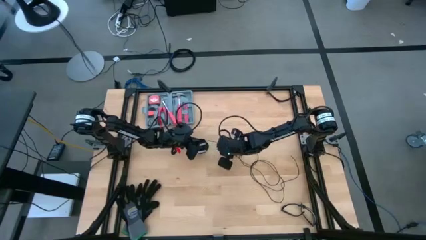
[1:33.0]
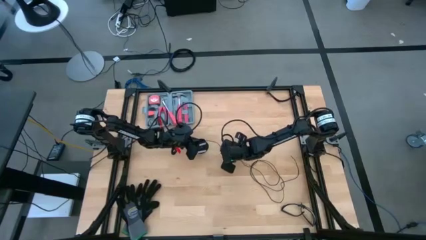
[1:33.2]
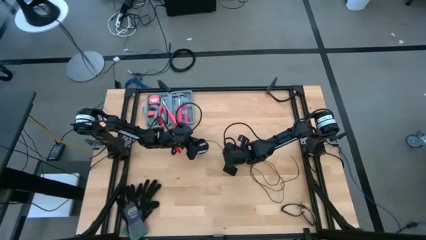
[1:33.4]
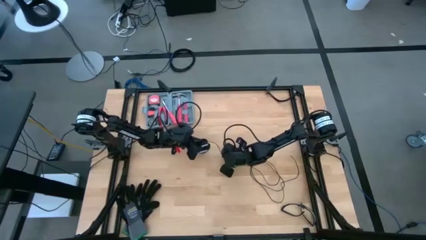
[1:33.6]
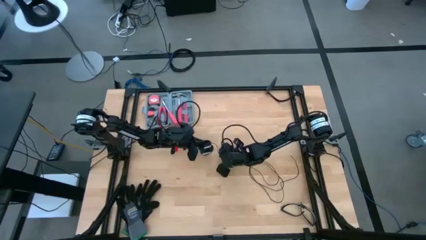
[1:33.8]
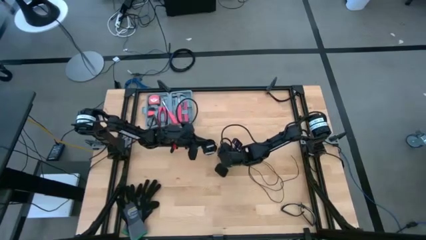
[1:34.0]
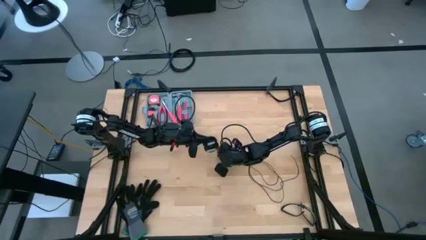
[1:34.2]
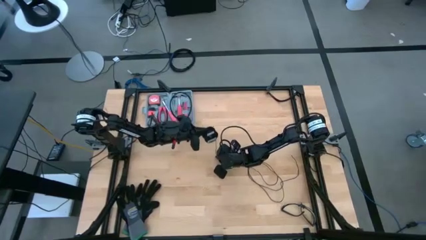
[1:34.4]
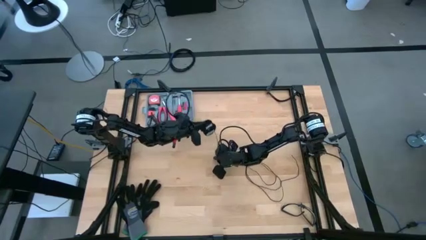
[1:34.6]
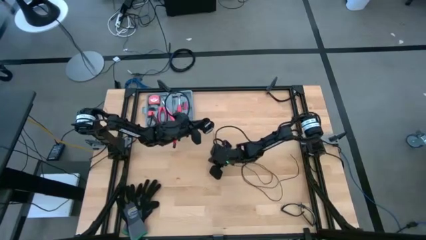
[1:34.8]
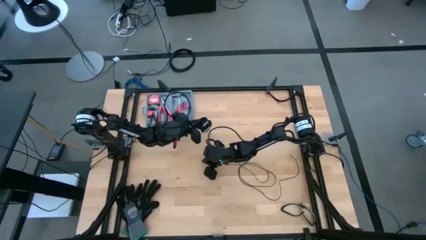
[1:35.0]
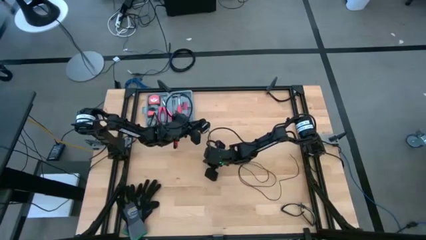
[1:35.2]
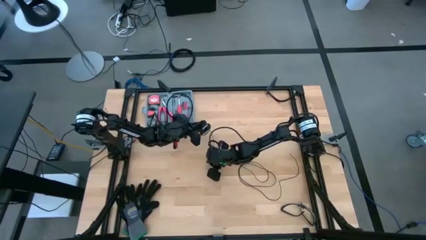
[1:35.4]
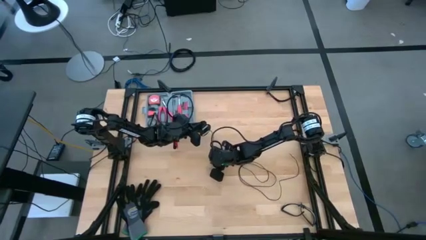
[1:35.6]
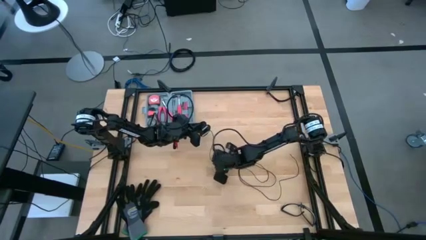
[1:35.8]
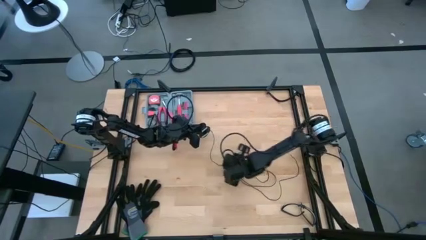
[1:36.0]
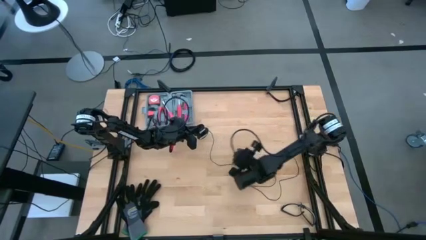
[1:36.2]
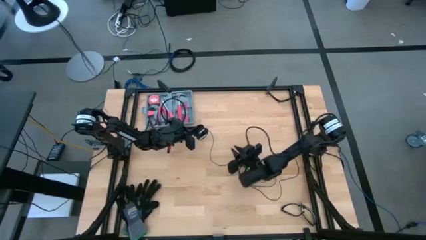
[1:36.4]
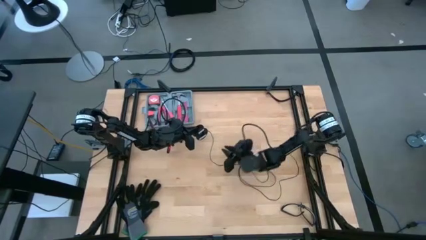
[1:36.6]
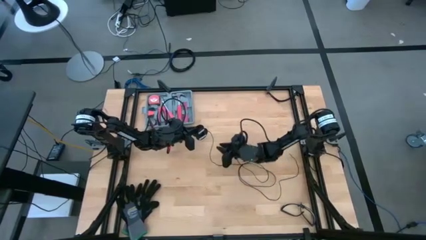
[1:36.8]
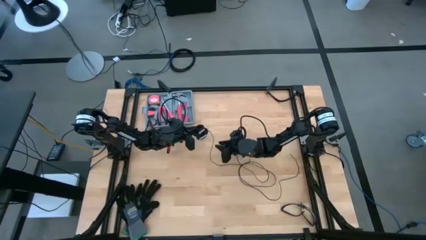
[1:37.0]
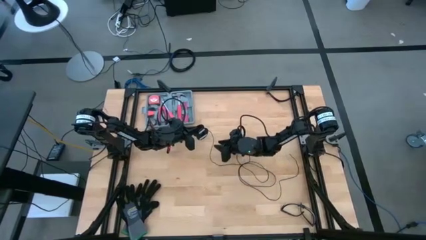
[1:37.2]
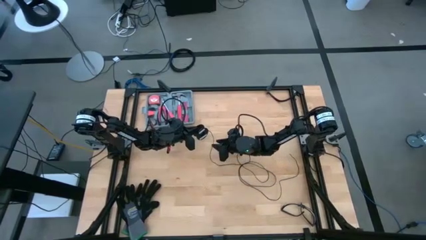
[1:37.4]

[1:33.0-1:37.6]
Task: Coil cords
Coil the black wire onto the spool

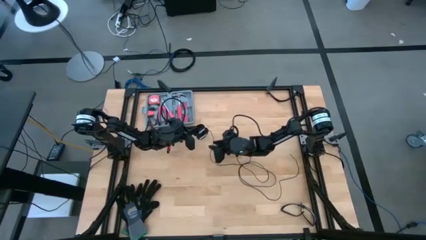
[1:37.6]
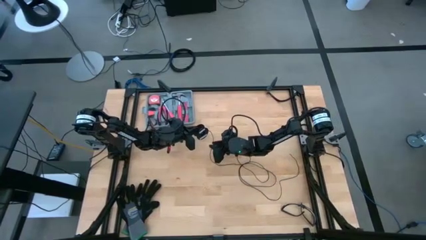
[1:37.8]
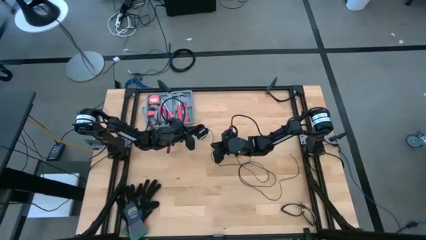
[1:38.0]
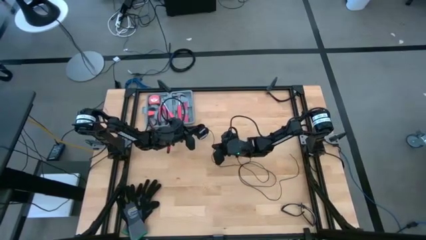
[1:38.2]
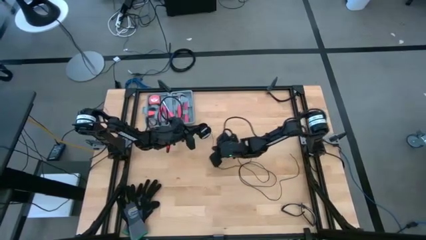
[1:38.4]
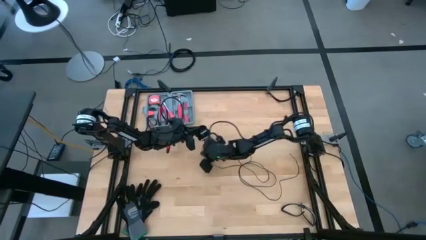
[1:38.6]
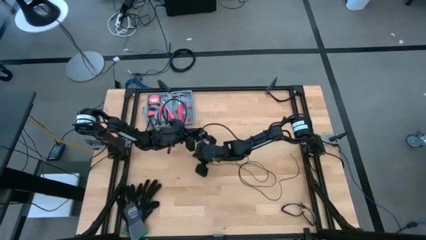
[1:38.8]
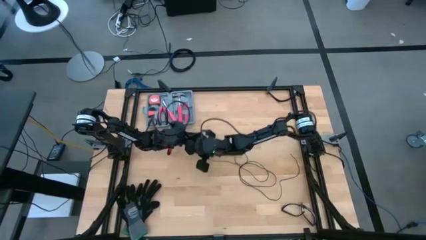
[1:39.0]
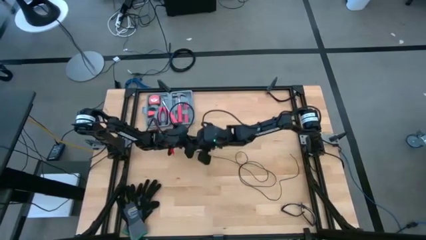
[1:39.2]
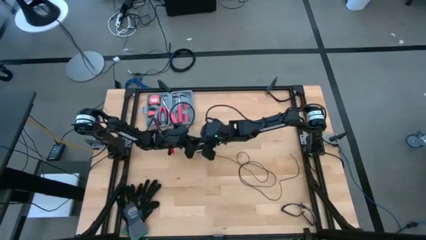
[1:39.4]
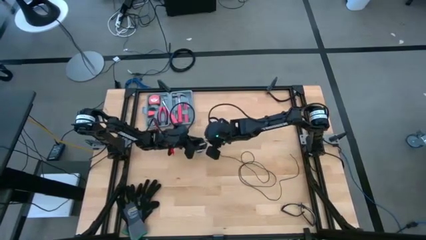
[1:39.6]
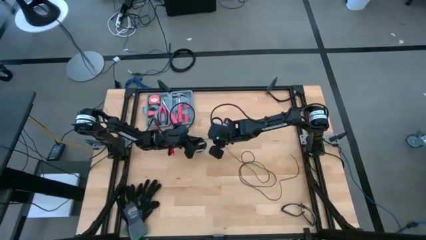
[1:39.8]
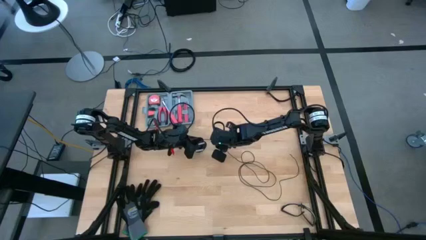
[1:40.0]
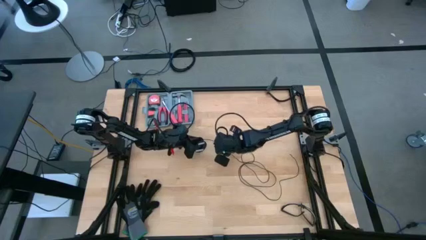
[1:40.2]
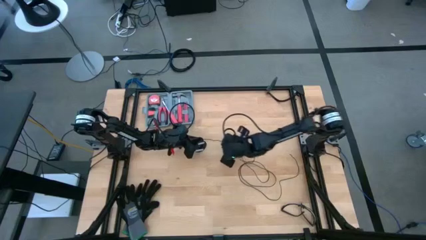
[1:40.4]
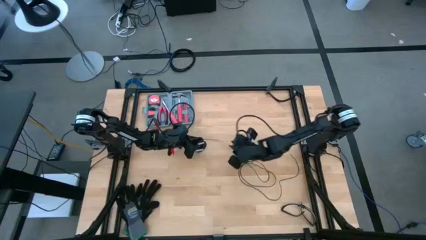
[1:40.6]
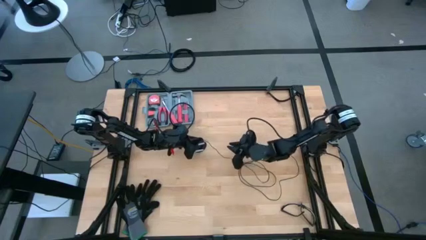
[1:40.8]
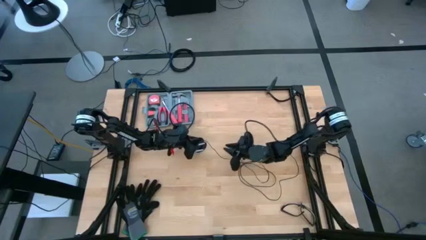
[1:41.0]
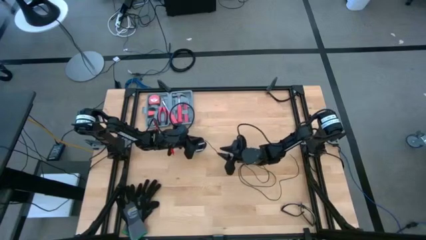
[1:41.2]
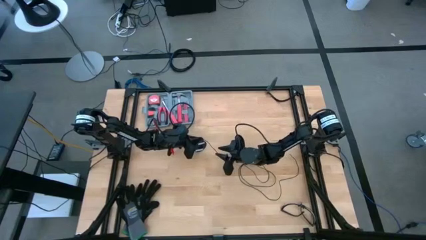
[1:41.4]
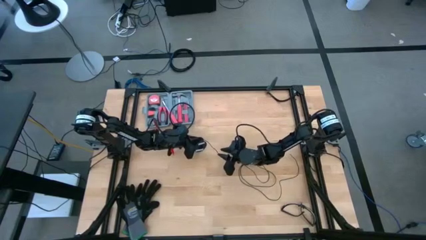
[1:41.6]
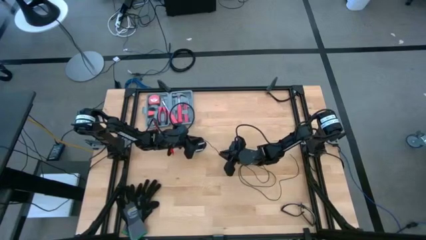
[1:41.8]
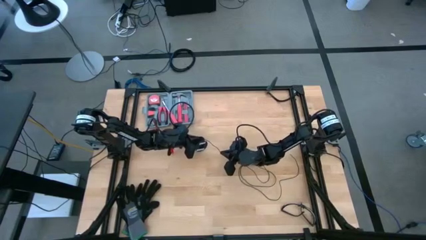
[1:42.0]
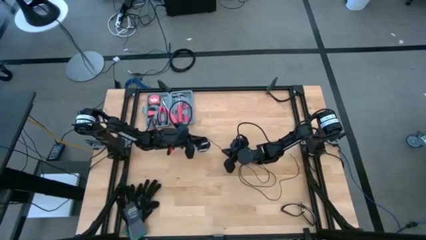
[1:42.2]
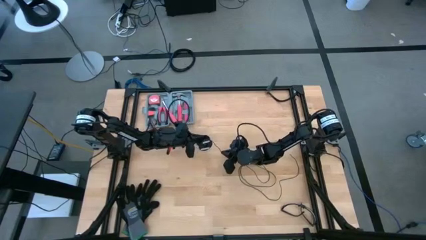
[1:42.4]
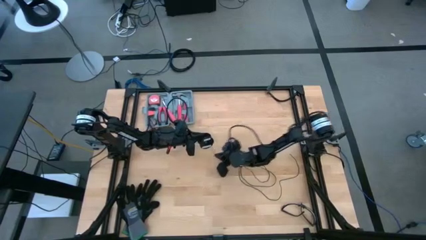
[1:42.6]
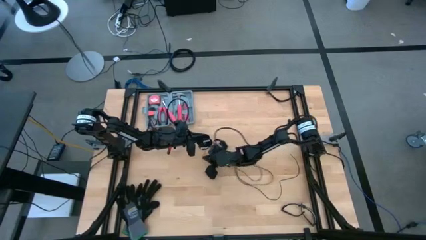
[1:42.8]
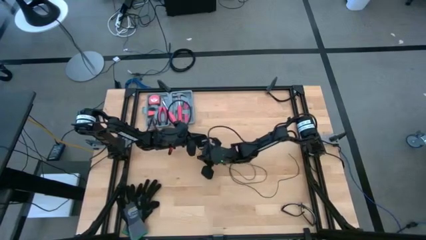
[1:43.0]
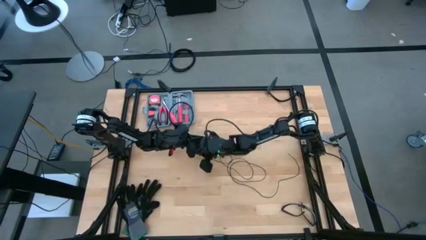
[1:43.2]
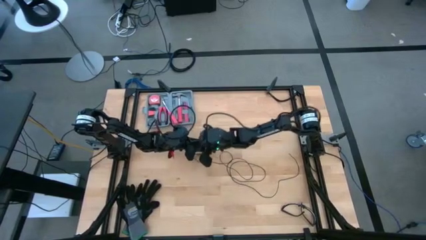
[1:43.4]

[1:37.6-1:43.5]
Coil the black wire onto the spool

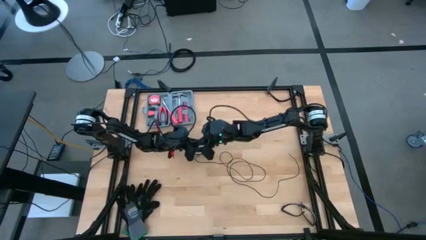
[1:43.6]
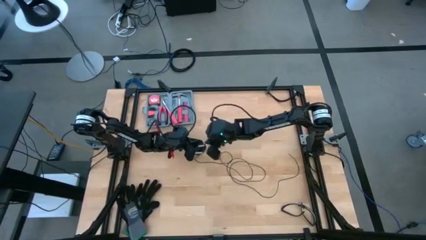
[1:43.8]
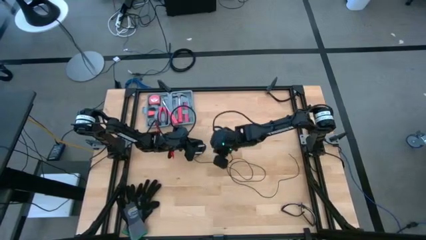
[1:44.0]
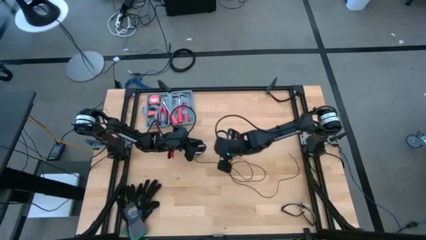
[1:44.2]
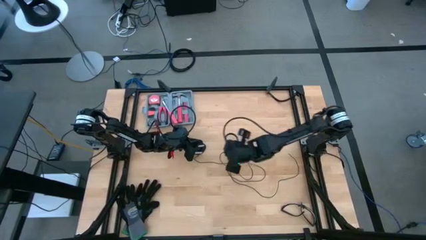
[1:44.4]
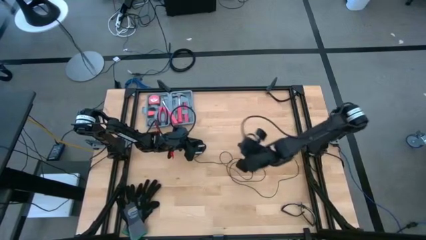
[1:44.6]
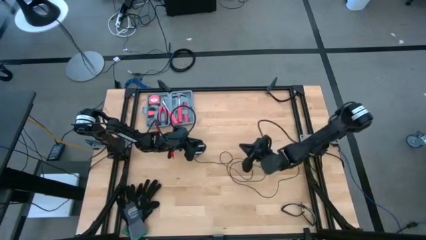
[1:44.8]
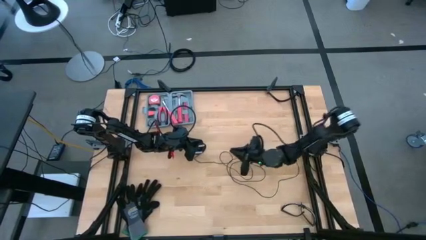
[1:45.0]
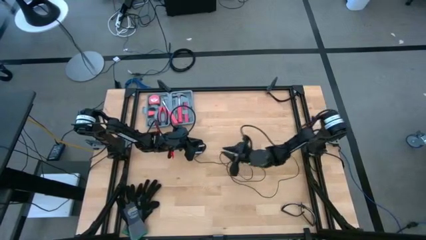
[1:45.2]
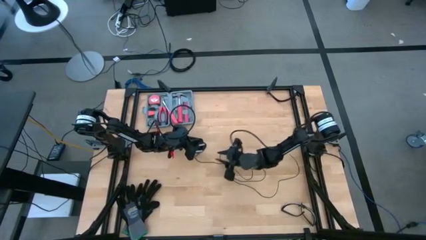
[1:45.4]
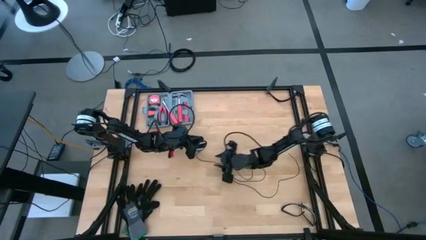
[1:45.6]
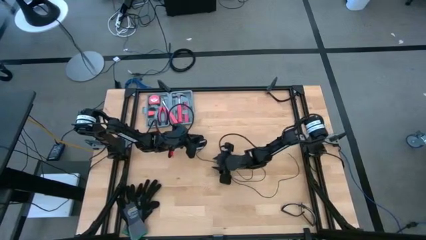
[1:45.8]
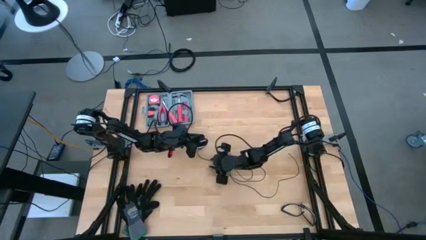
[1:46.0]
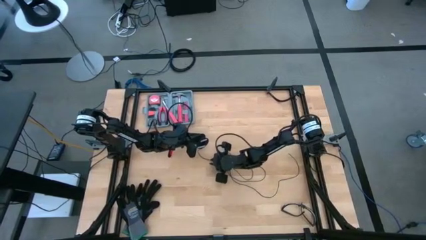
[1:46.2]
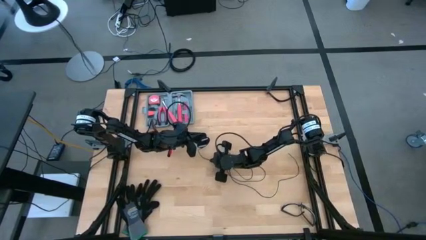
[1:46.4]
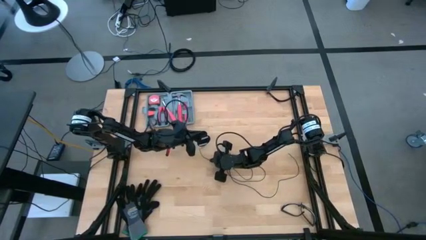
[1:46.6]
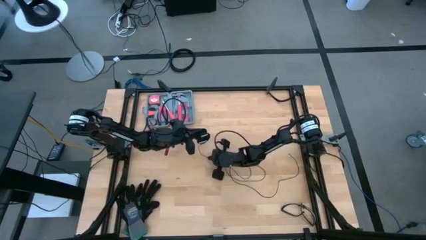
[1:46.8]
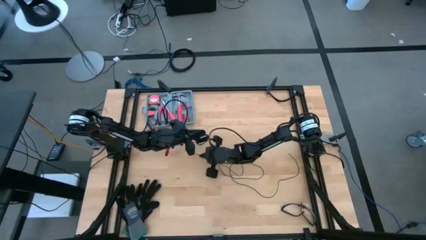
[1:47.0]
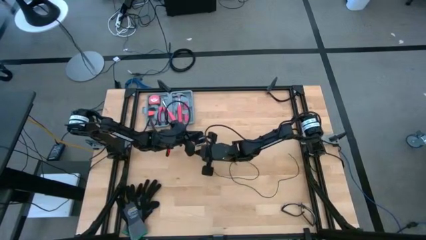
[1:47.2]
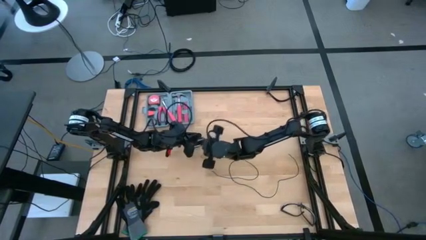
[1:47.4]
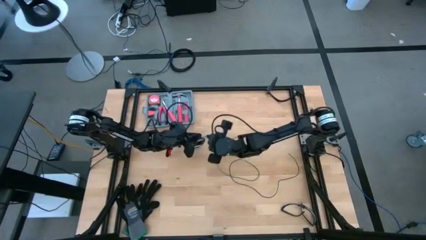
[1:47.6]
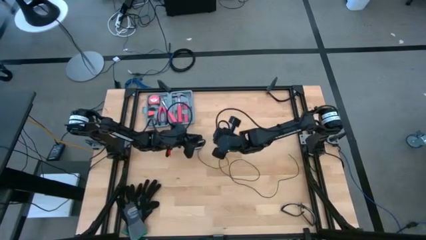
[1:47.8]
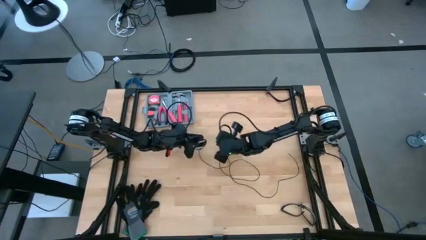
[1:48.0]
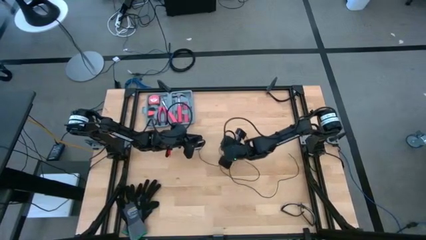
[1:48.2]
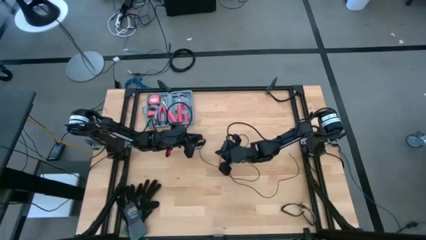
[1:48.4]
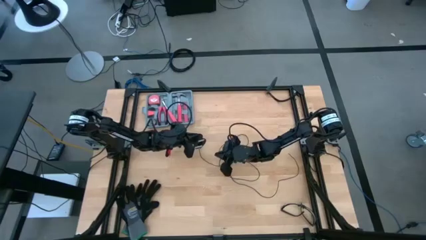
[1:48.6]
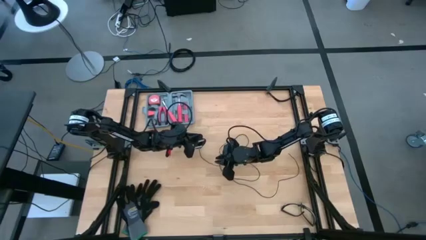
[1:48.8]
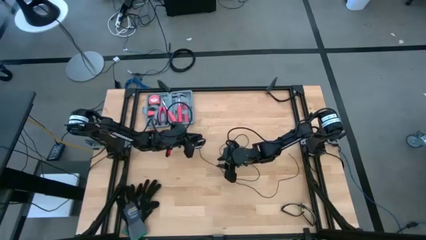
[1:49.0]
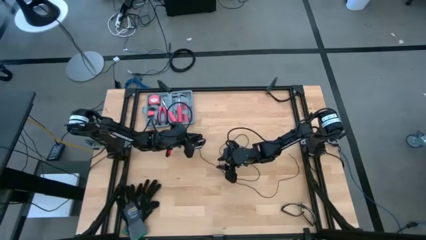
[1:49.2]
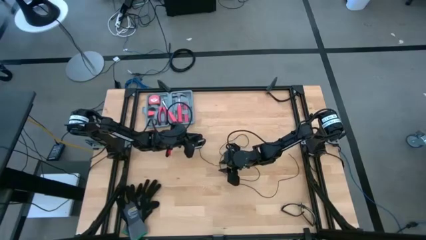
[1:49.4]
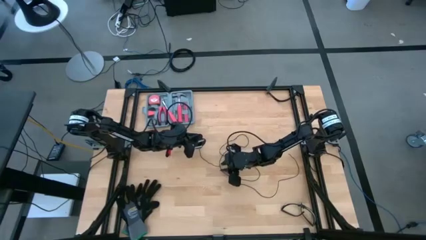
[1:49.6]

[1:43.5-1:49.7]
Coil the black wire onto the spool
